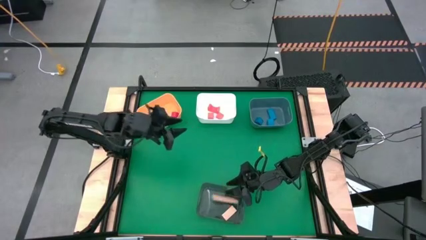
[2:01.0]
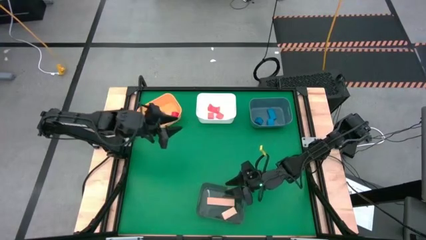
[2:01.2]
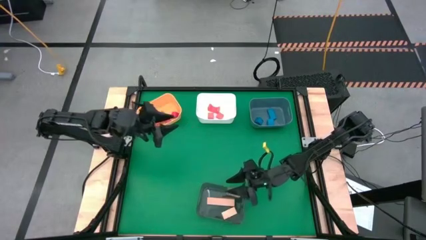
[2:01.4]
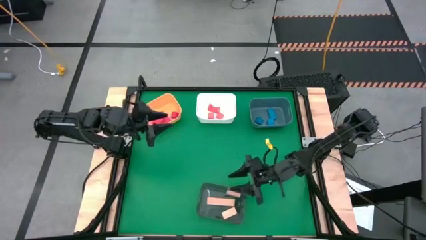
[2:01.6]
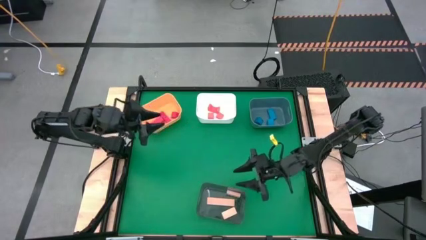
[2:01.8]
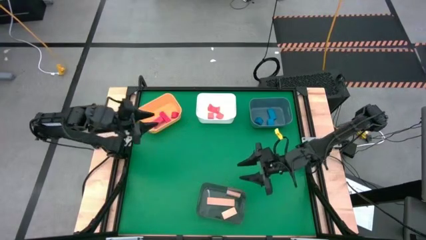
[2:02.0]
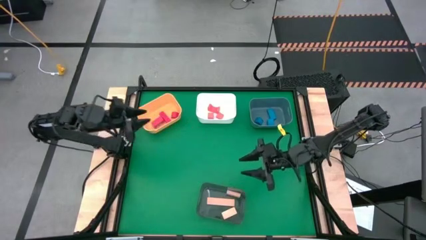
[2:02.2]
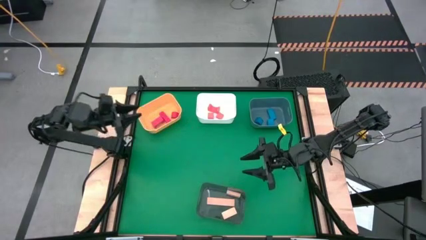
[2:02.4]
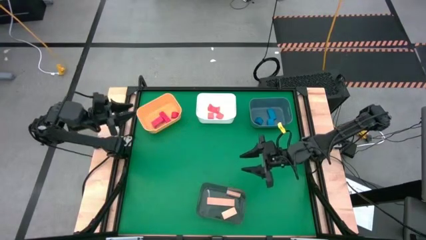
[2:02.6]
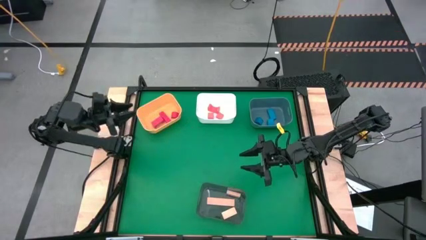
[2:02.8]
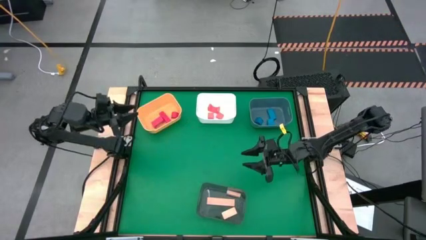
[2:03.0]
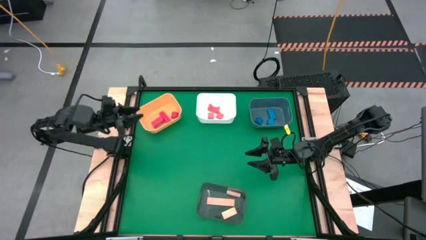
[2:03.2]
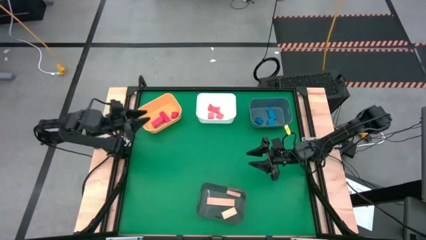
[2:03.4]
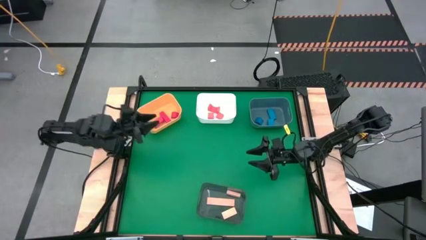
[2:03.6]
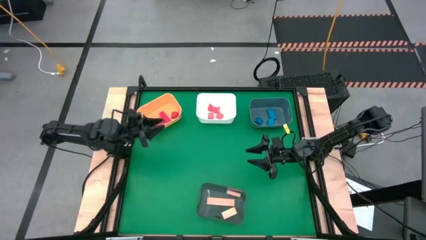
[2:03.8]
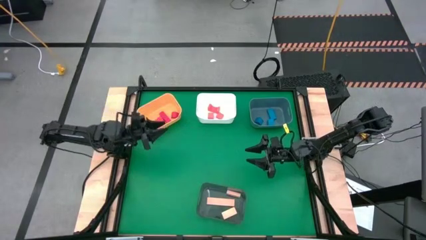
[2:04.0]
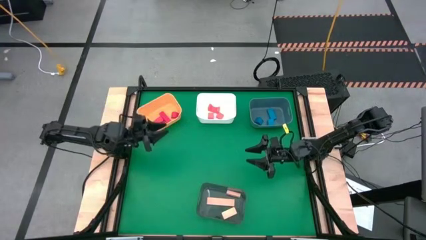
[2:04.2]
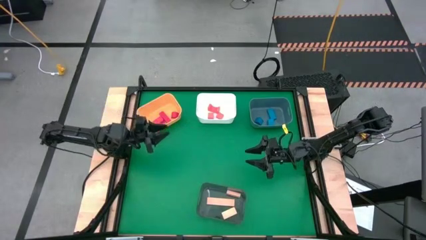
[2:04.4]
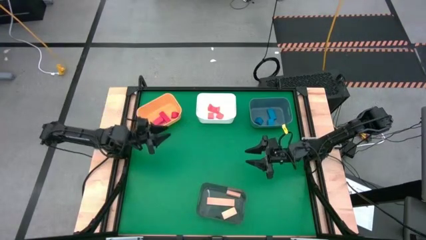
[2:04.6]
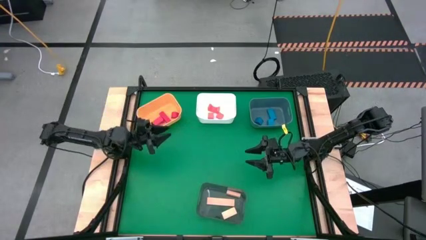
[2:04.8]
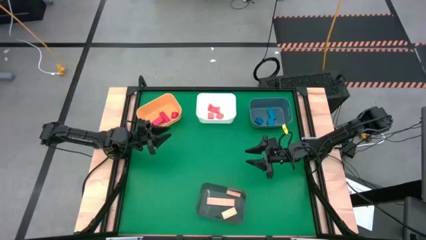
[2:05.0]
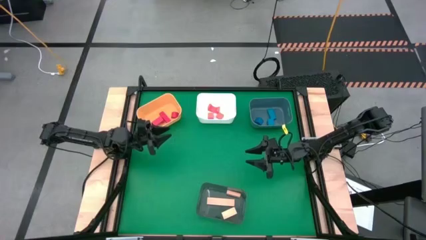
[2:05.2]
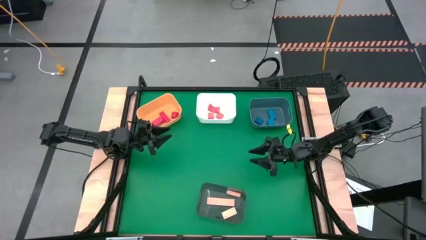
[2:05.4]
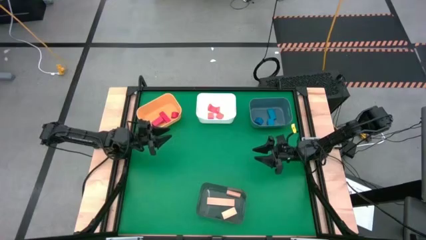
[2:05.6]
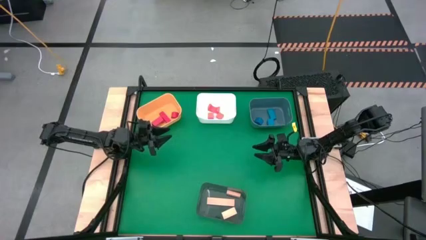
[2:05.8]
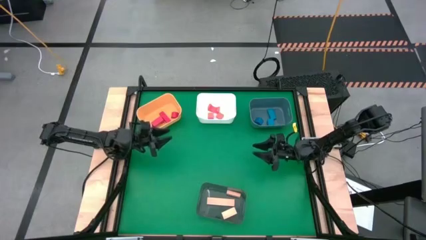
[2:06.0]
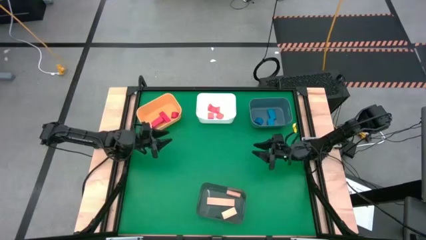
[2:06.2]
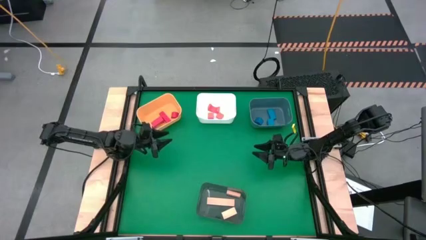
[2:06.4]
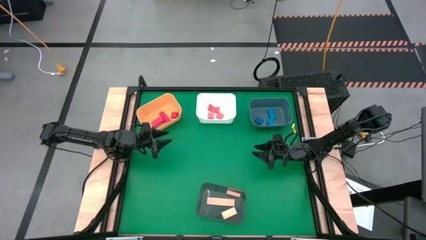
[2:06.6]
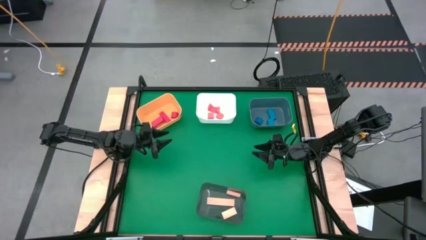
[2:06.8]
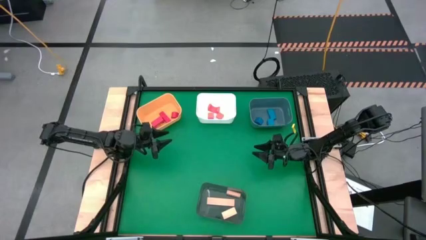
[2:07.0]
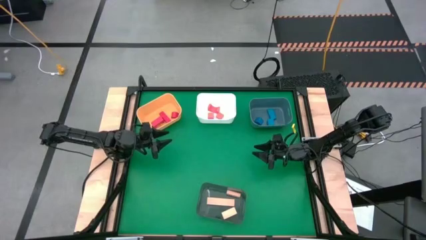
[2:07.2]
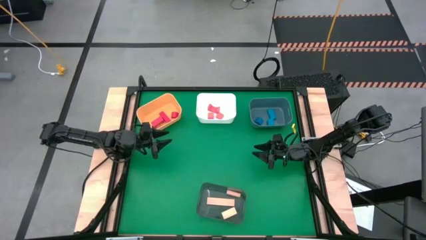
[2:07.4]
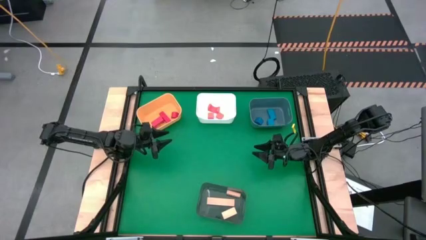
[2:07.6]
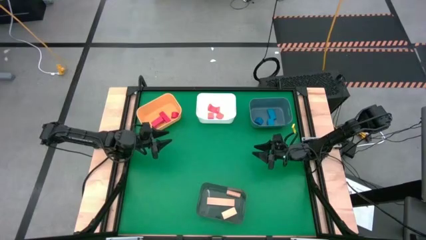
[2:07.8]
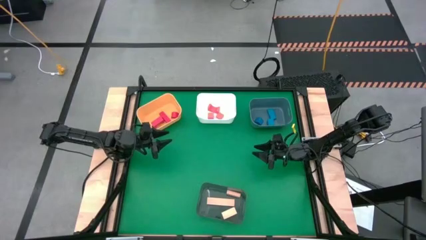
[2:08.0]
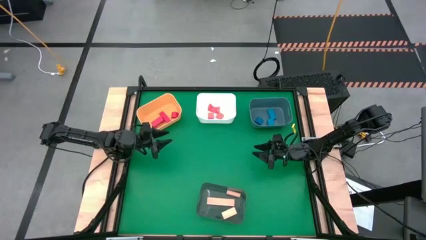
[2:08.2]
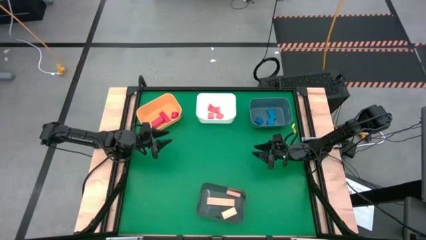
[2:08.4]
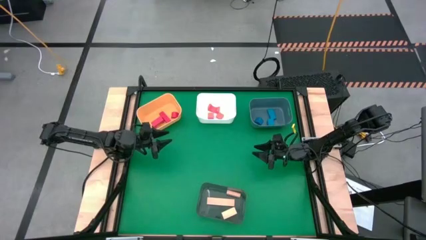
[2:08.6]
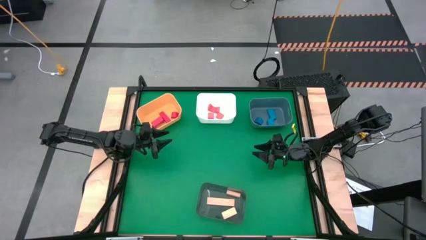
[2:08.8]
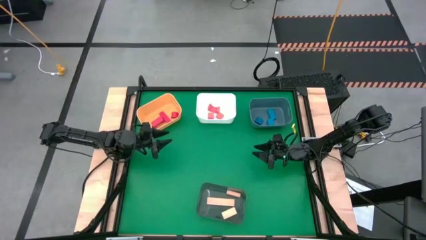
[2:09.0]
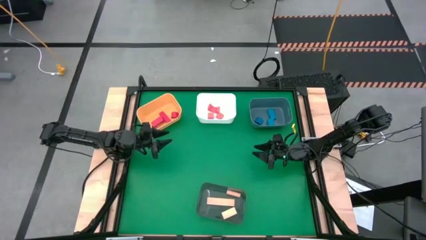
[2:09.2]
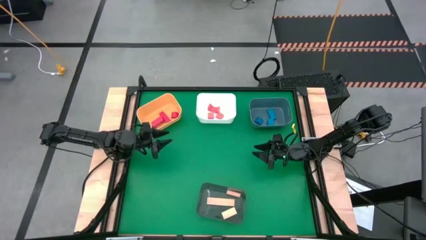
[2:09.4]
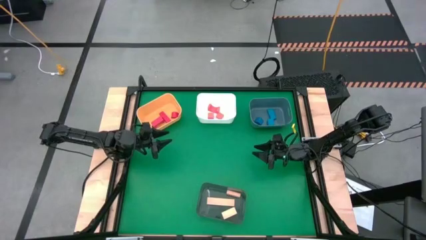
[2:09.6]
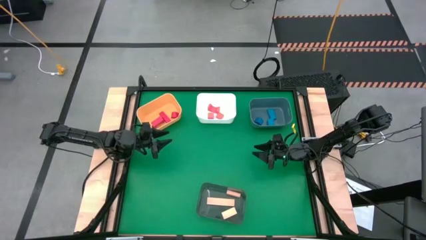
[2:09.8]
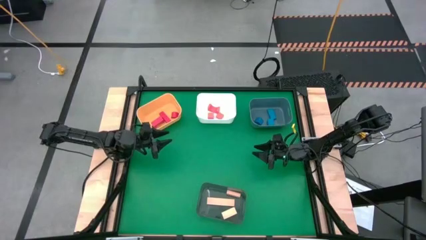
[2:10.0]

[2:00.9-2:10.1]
Task: Sort & place blocks by color
Return to Home Position

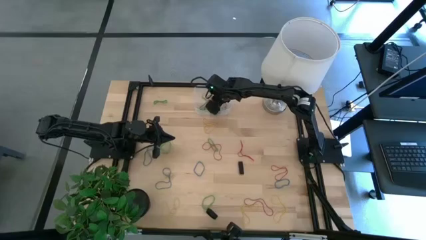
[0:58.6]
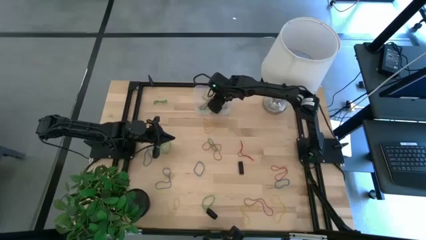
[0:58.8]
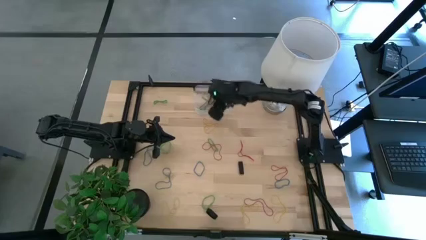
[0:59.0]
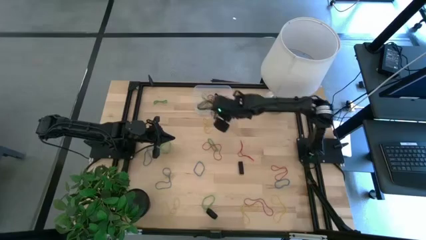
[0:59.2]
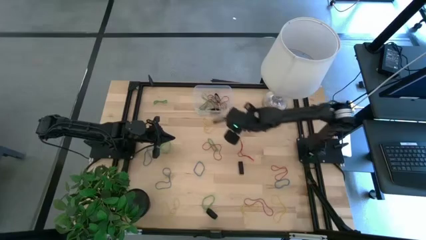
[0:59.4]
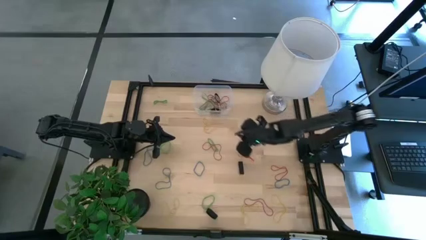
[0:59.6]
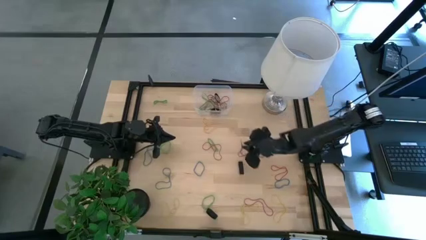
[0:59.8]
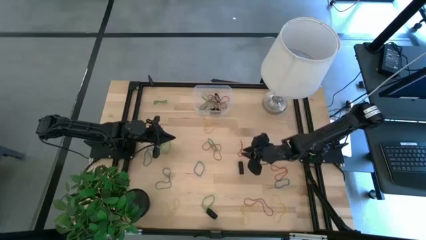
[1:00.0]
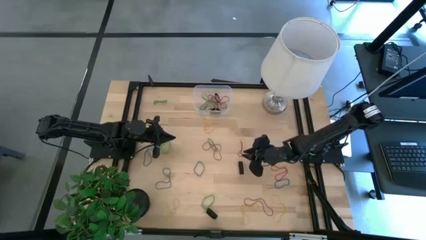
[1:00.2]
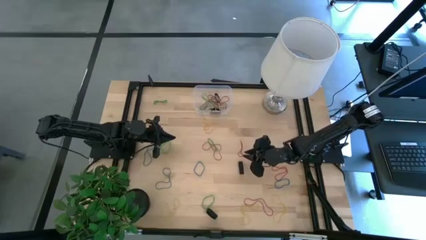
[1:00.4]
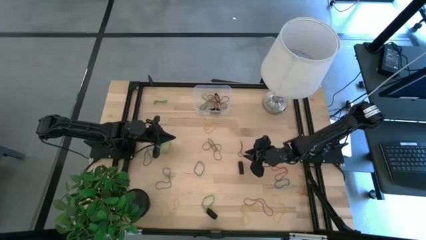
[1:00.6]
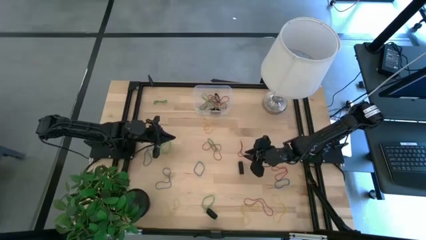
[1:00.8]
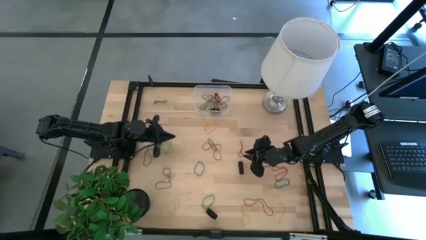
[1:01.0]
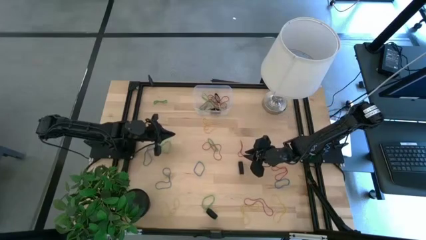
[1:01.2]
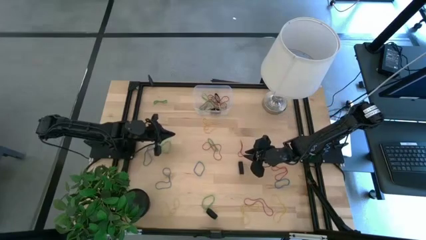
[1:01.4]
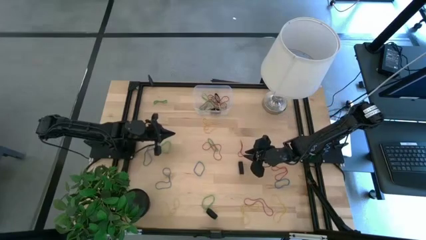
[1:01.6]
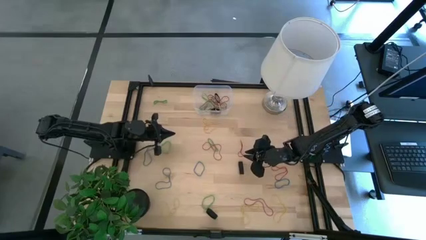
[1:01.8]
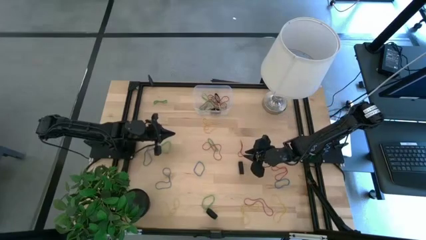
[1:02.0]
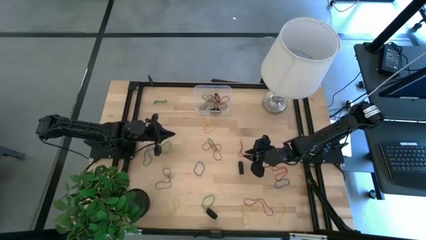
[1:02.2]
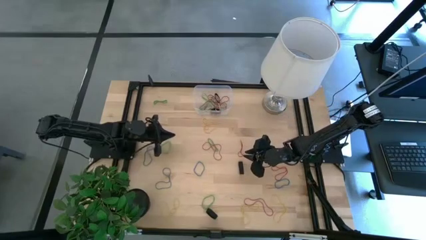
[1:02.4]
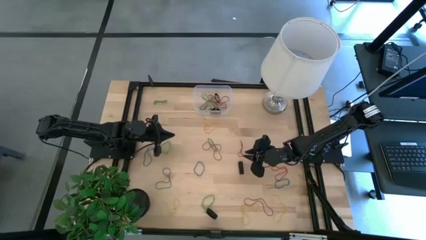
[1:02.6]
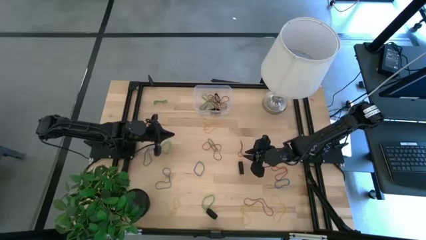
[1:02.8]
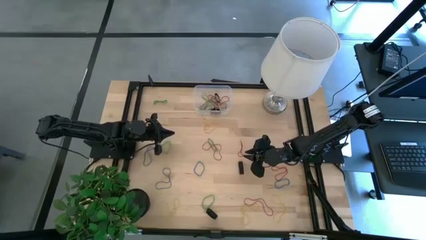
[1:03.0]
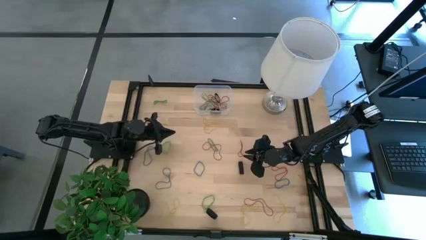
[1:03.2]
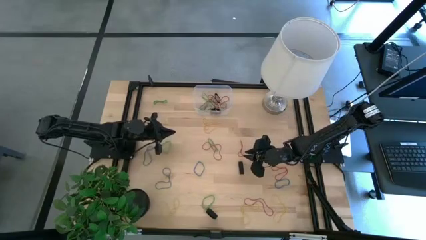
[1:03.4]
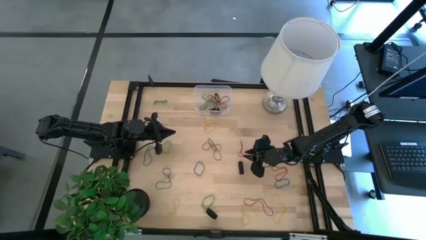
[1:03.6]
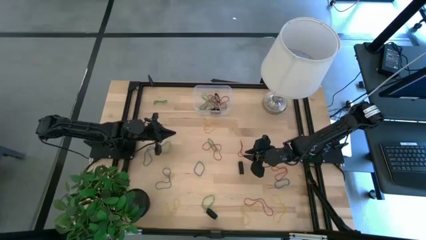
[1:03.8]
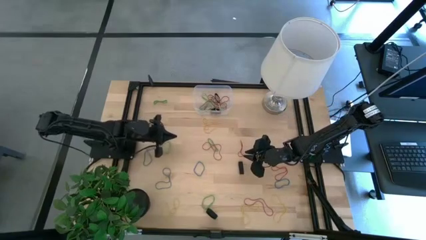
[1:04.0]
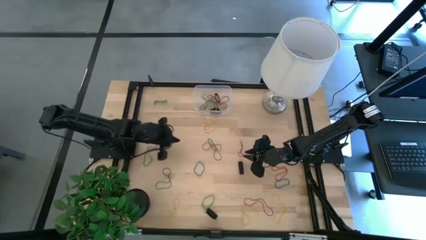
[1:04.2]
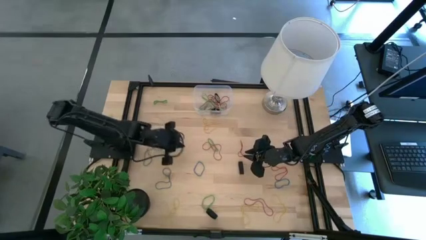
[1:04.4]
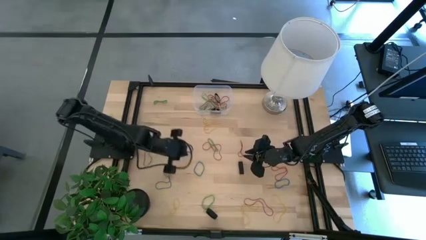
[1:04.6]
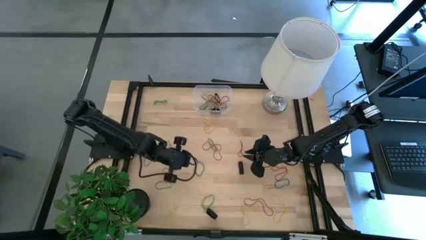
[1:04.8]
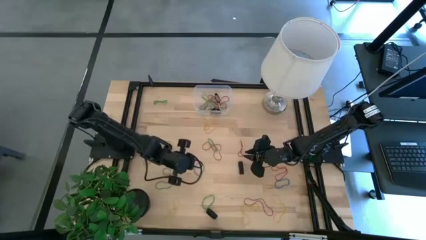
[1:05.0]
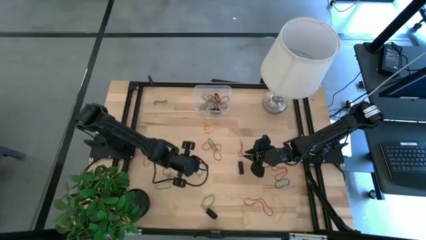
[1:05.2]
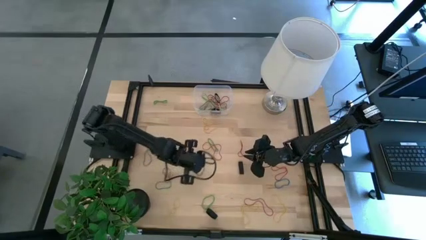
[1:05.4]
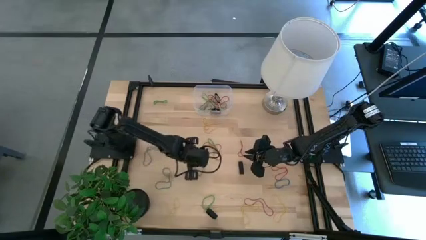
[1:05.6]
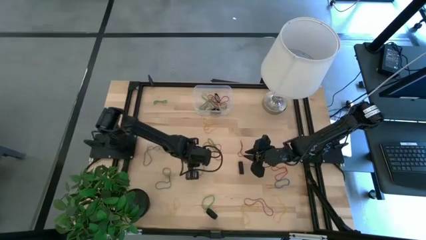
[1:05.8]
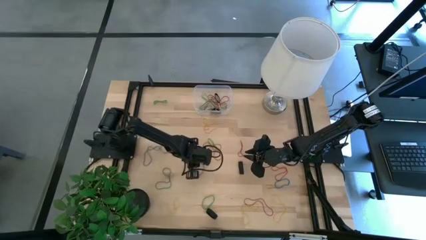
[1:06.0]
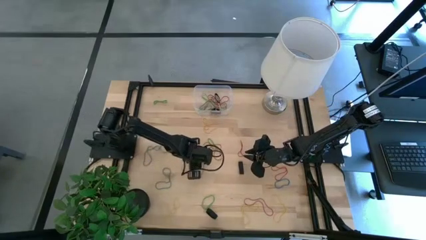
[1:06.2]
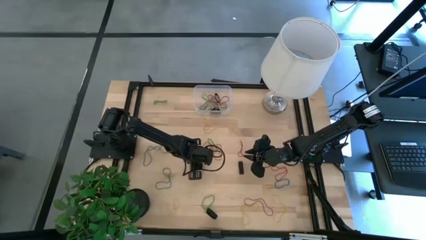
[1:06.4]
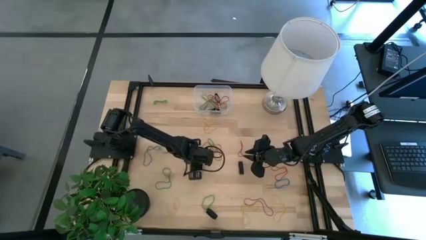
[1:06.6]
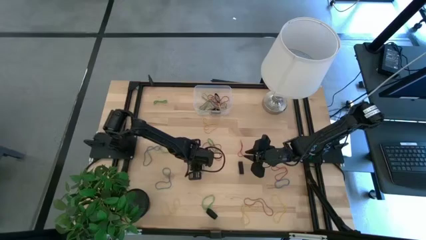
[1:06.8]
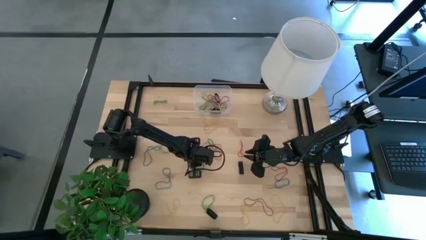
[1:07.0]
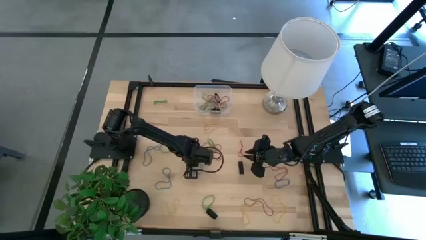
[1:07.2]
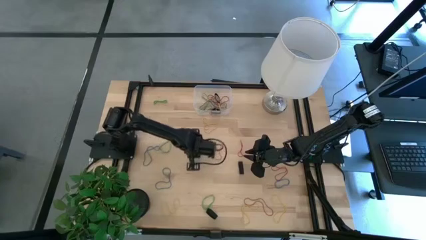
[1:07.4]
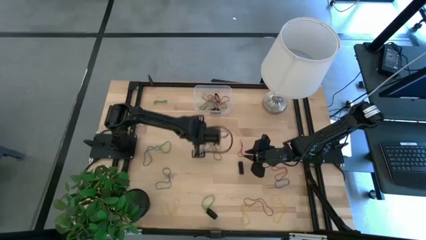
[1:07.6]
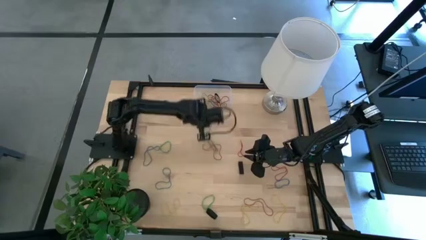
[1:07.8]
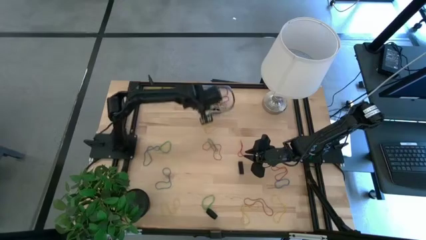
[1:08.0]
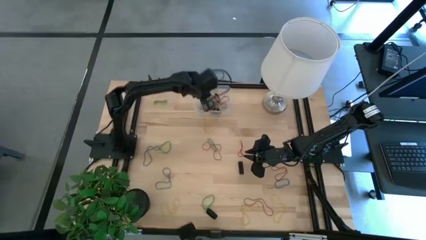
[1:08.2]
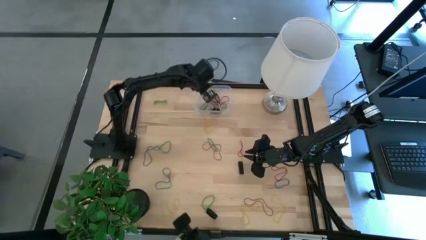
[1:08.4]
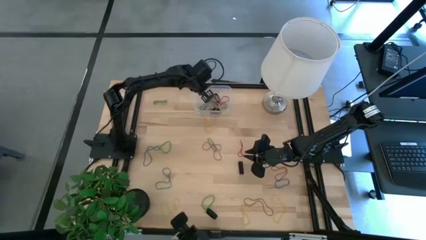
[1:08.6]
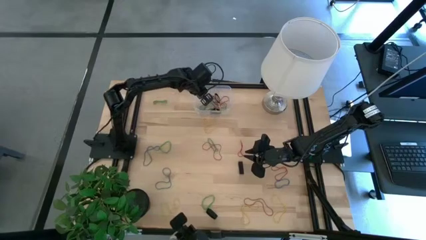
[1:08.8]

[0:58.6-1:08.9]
Task: Pick and place rubber bands into bin
Put the blue rubber band into the transparent bin
